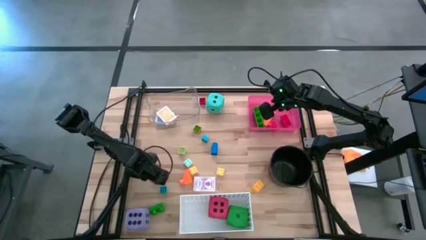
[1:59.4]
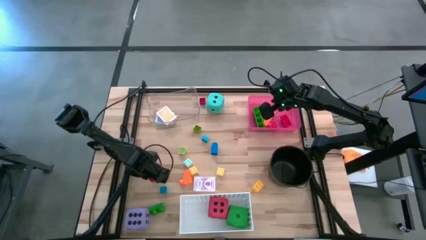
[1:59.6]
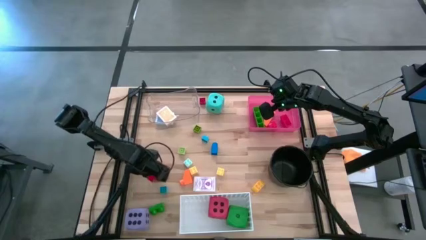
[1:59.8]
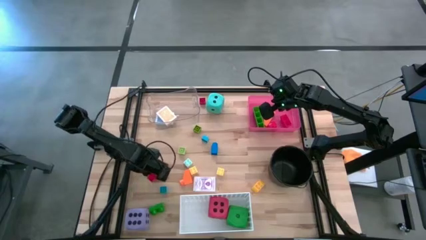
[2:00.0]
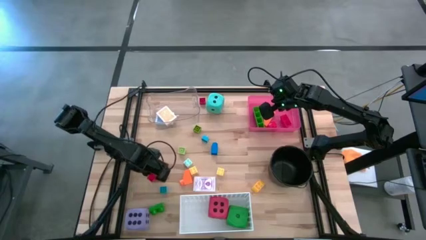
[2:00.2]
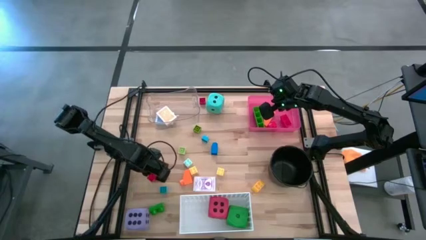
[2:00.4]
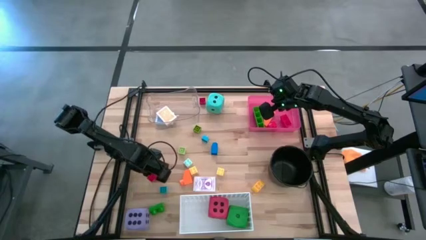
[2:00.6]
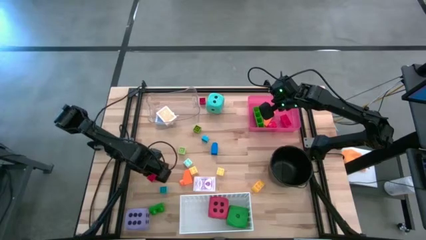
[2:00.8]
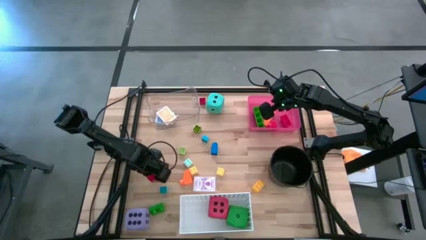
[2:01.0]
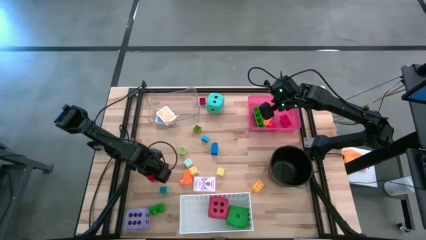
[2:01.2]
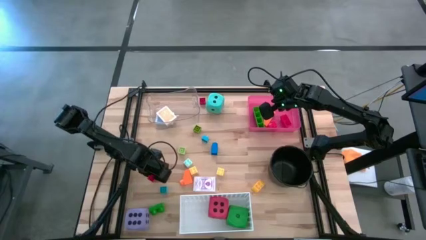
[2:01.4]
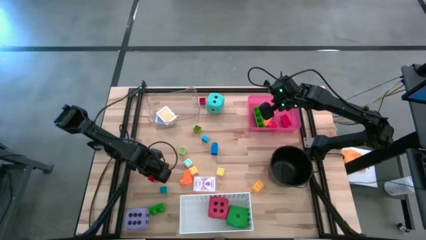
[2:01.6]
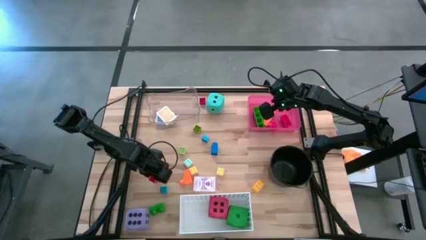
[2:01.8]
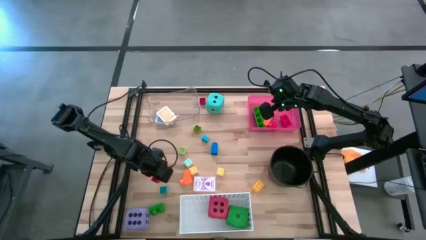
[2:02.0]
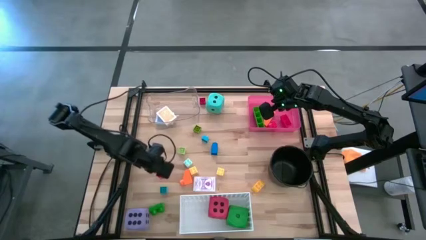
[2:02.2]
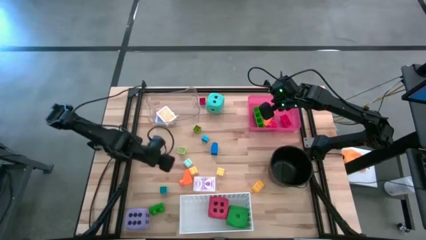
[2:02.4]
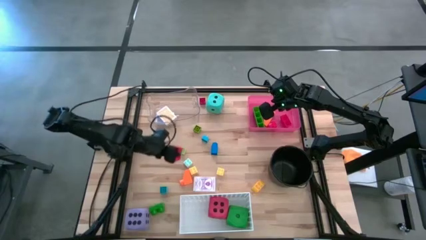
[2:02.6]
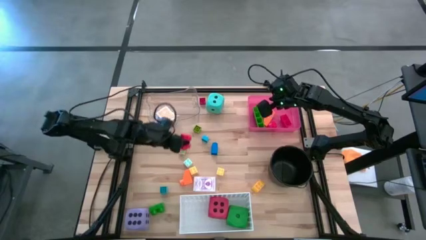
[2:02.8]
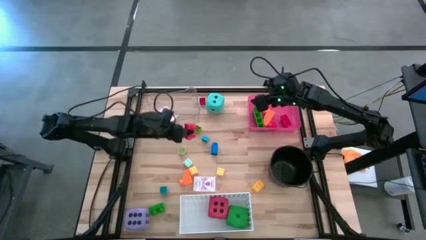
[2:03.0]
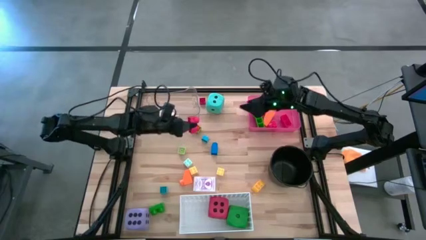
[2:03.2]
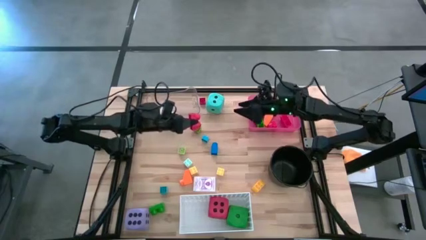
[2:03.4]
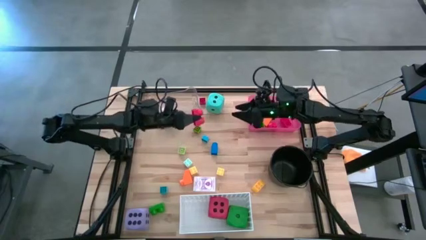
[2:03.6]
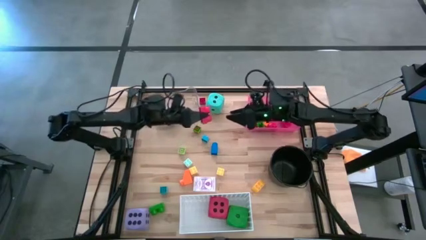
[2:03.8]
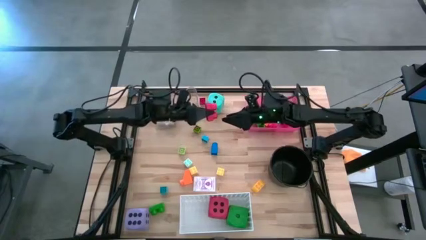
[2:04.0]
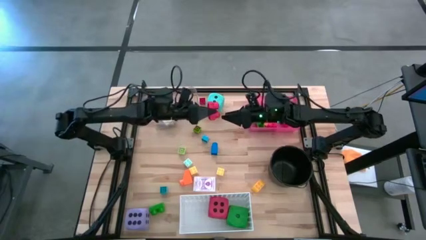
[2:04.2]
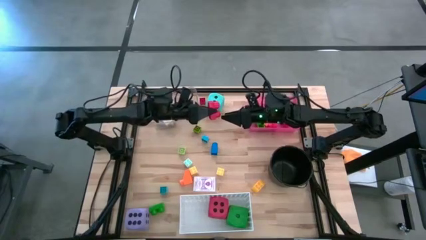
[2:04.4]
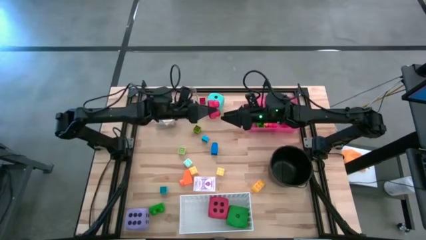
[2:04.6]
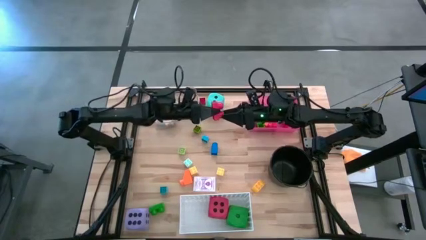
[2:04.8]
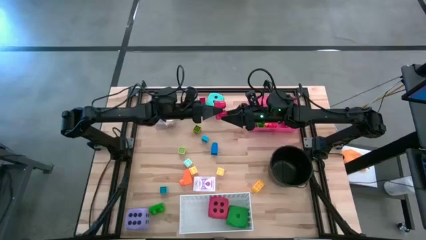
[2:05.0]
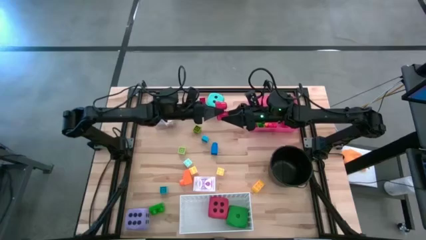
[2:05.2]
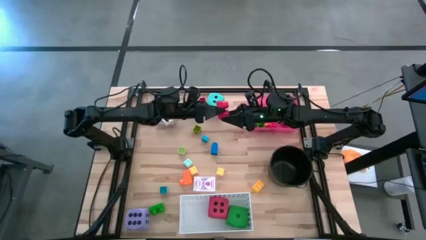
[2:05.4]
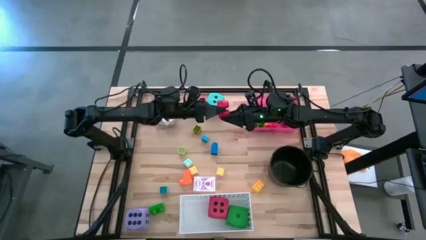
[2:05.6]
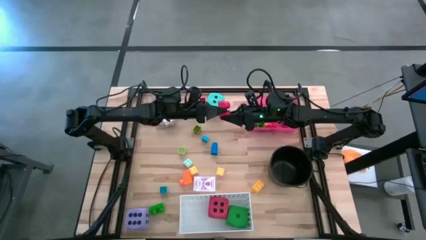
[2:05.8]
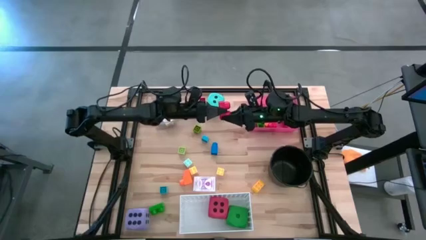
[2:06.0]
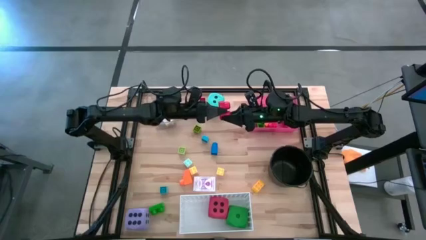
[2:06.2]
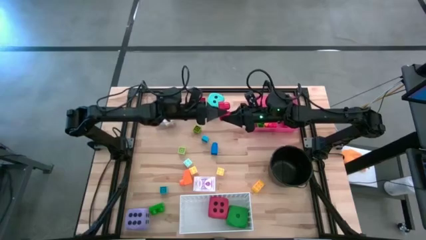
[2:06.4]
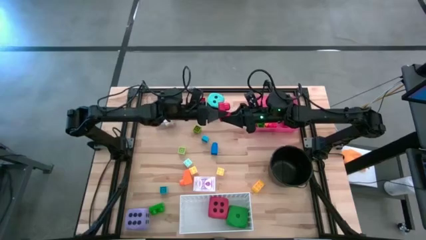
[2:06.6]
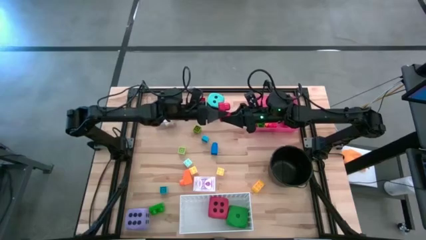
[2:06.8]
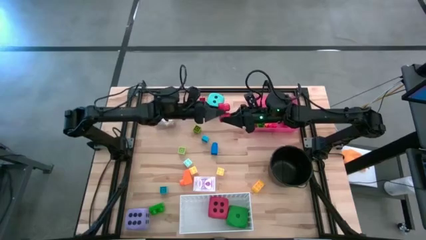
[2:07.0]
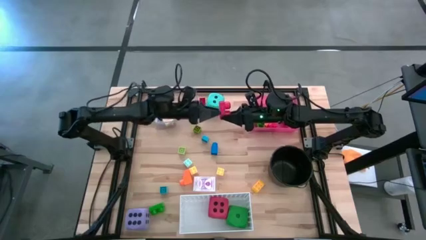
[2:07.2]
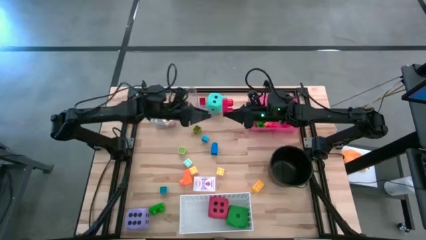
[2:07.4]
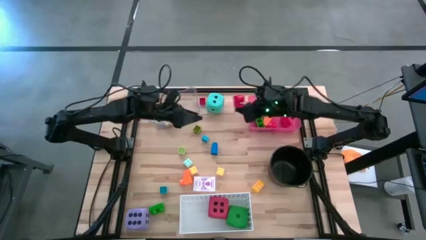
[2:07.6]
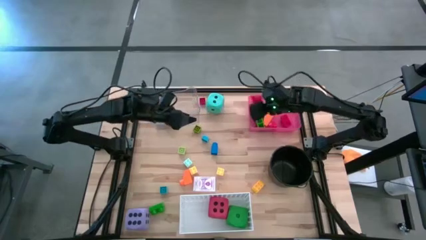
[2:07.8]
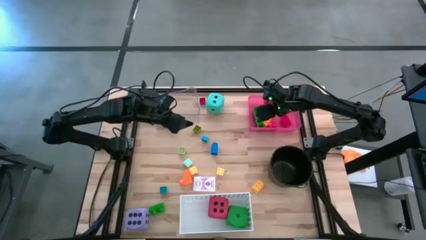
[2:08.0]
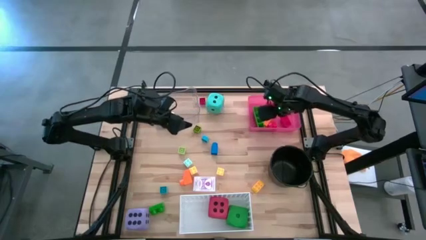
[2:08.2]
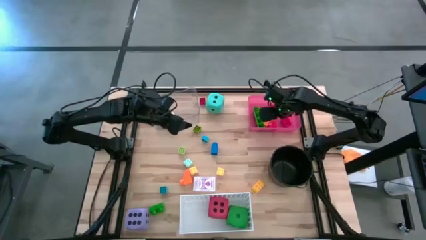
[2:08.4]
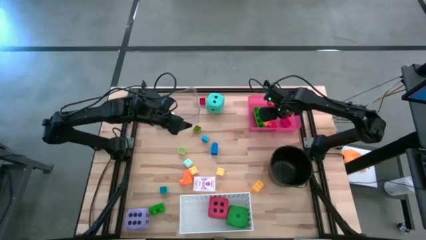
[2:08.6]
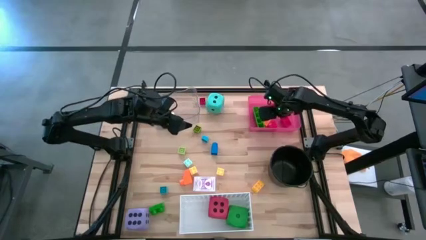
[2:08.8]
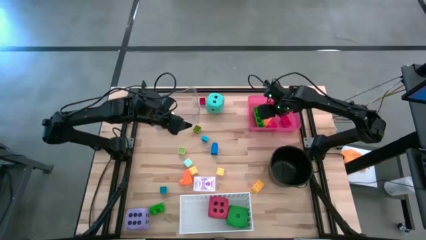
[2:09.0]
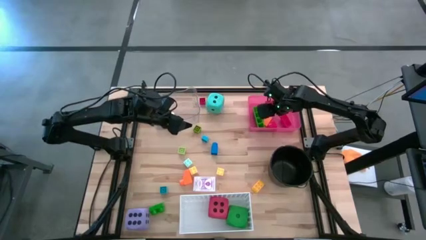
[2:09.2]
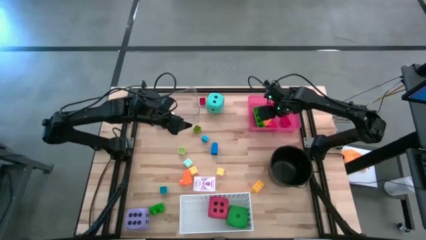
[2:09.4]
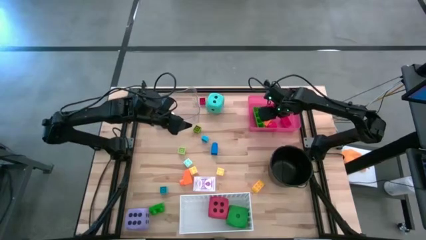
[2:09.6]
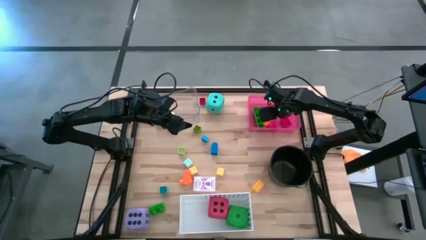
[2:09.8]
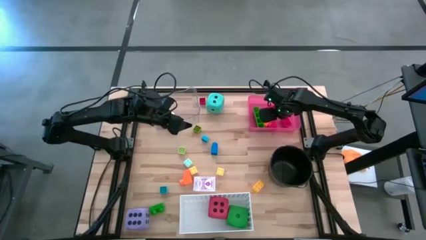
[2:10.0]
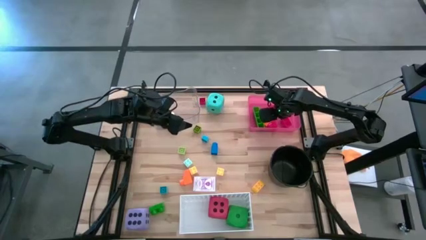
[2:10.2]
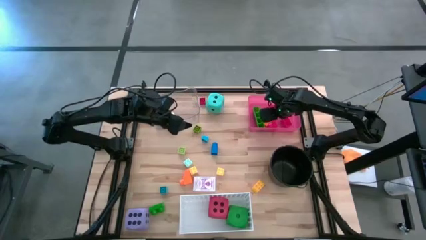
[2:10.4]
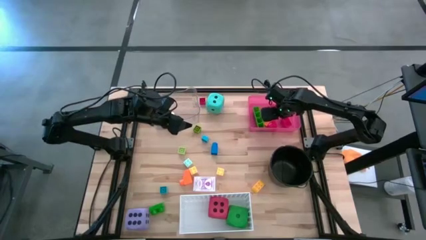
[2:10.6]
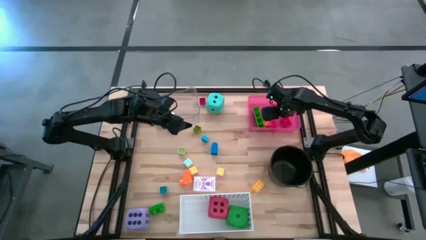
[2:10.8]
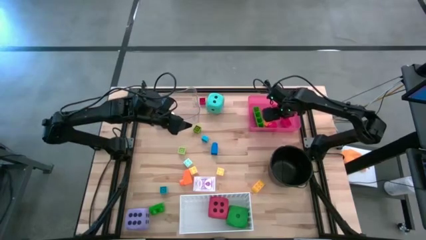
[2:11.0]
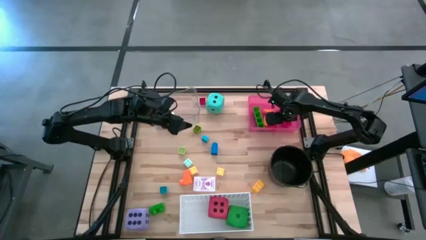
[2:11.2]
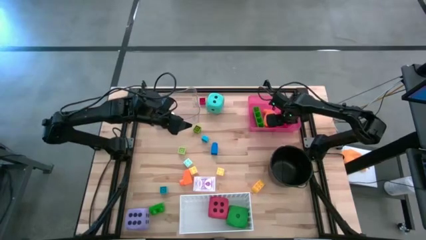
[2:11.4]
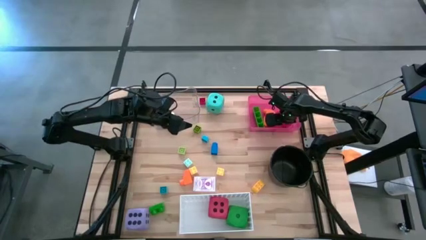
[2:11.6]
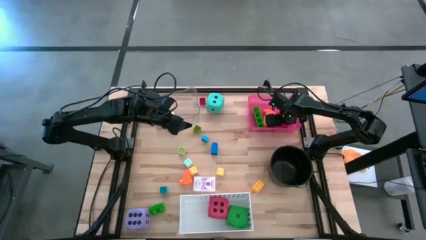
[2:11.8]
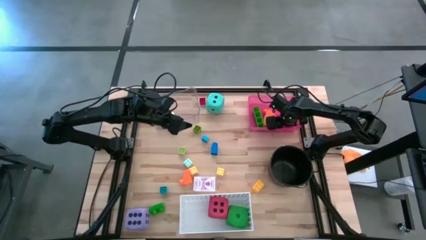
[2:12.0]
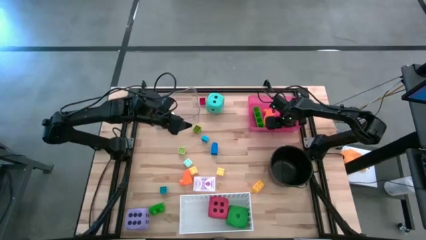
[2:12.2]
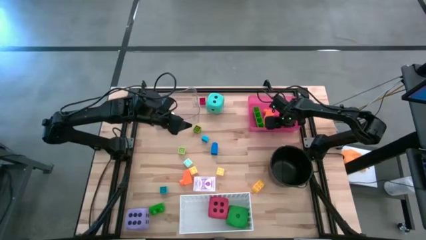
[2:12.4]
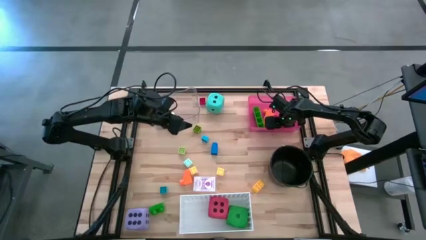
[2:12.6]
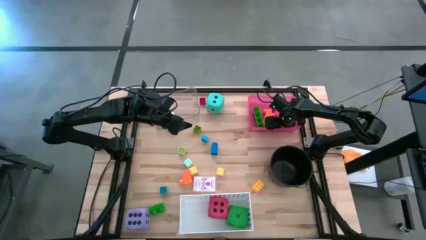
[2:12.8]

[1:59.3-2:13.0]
Task: Pick & Place Toys
Put the red game piece into the red bin

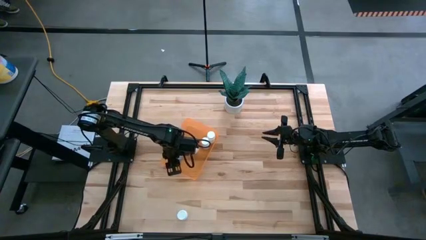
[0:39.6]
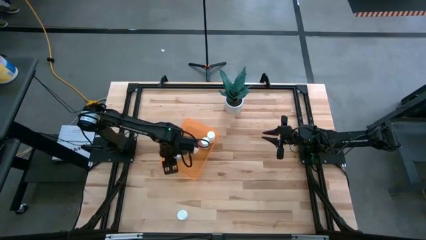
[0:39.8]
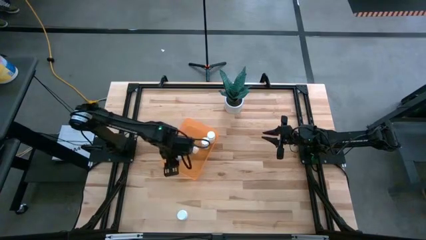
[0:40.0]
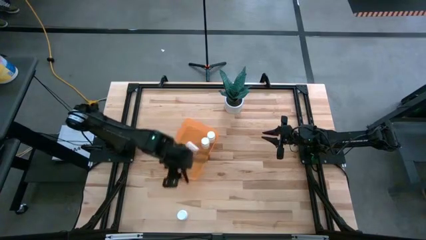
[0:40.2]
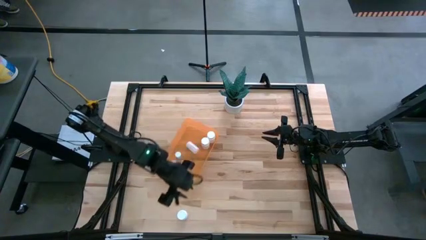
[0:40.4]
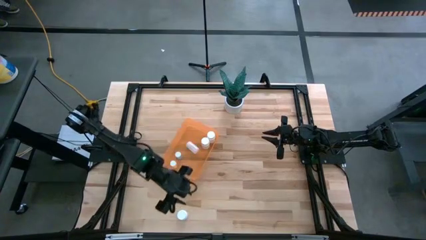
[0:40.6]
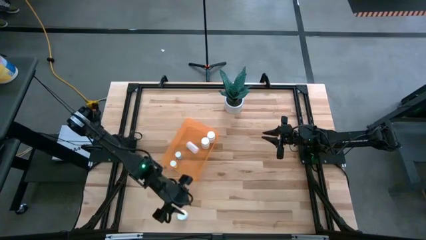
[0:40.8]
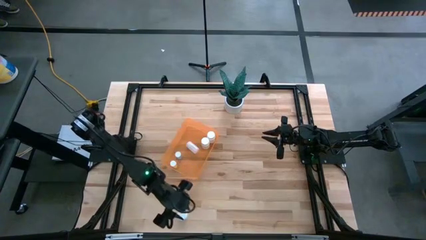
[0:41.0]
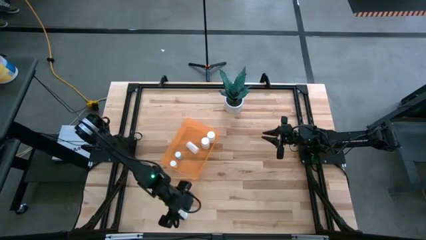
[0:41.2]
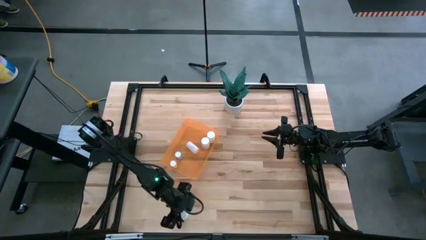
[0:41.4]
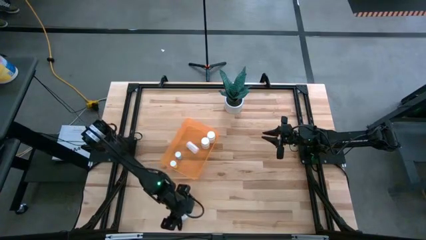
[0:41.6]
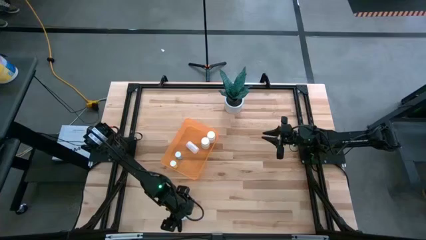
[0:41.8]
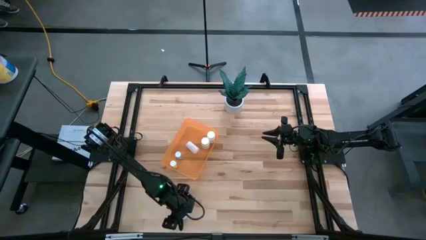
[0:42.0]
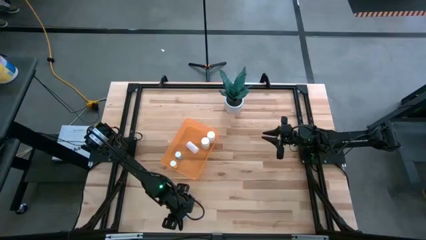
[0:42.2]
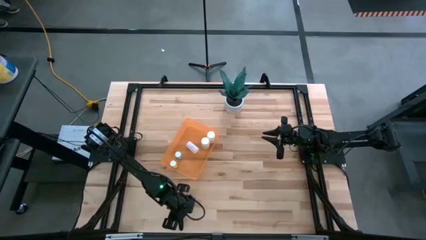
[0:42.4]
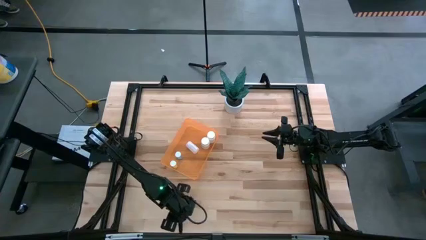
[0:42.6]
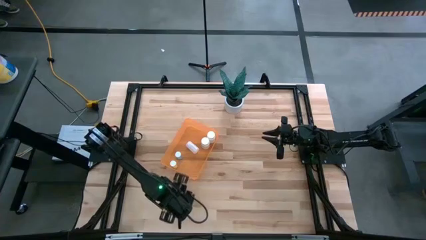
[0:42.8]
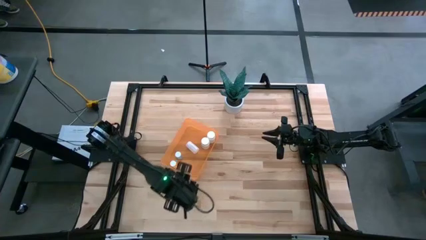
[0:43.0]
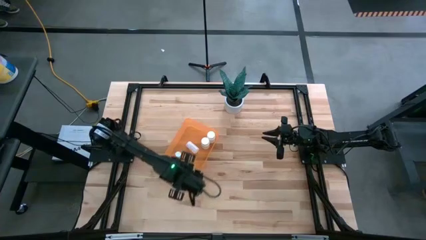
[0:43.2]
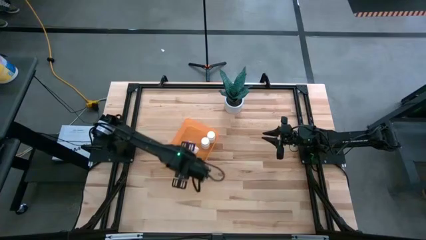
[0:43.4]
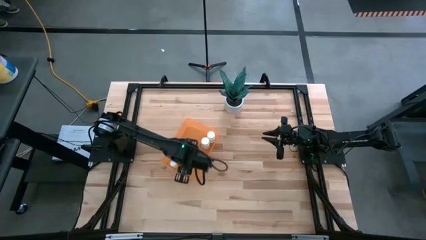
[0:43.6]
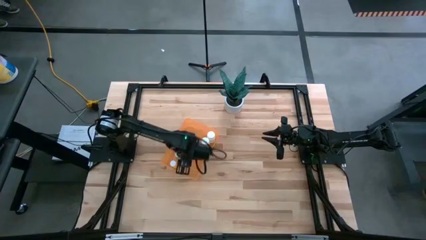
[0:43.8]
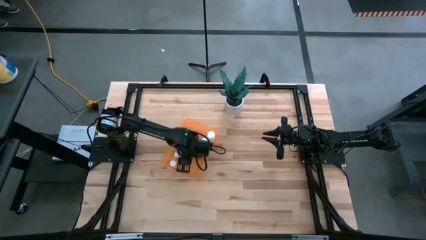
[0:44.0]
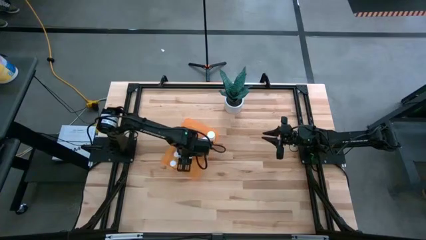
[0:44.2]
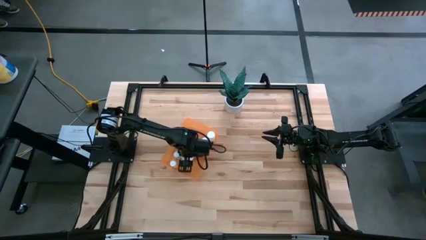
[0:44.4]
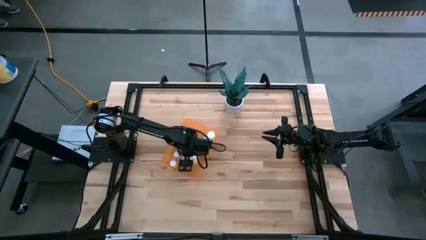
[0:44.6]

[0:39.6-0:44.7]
Task: Pick and place pill bottles into a basket
Put the white pill bottle into the orange bin
